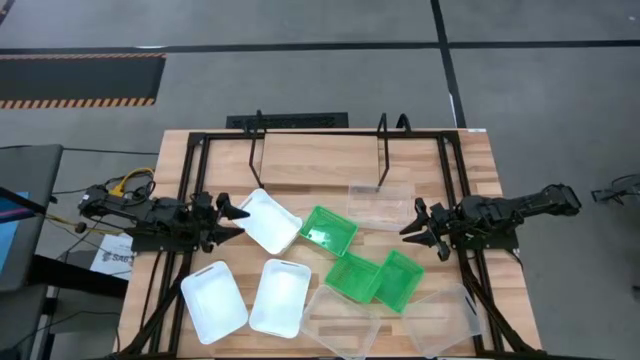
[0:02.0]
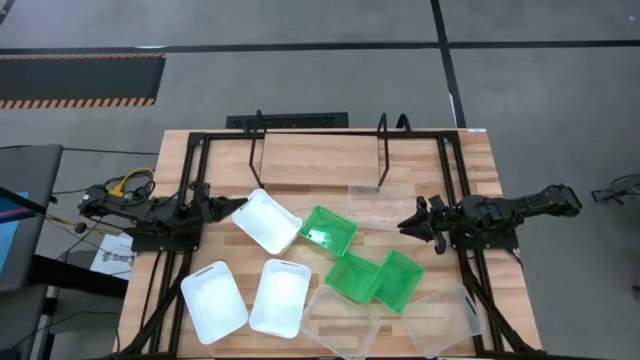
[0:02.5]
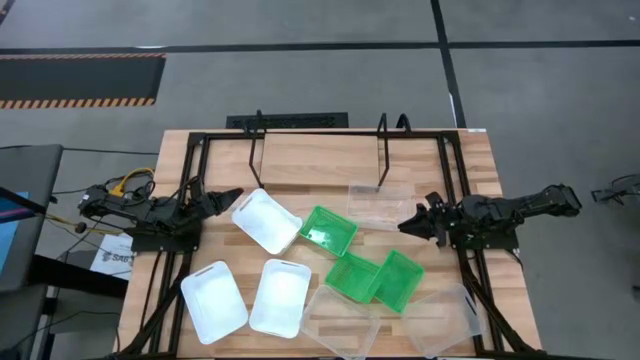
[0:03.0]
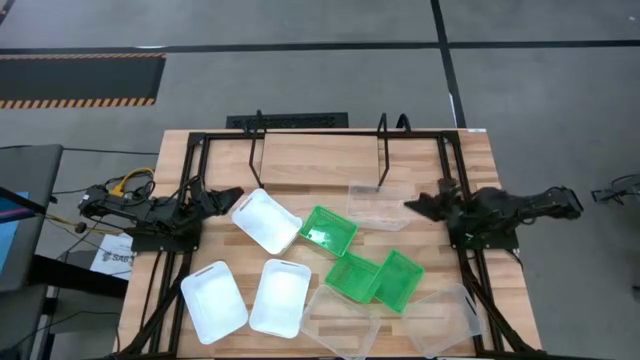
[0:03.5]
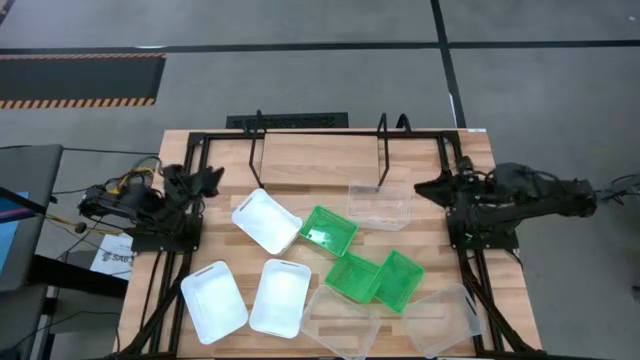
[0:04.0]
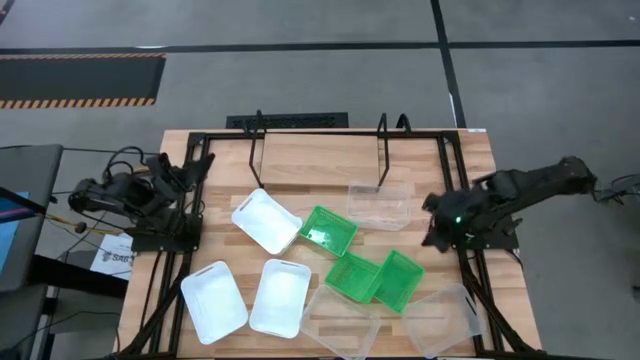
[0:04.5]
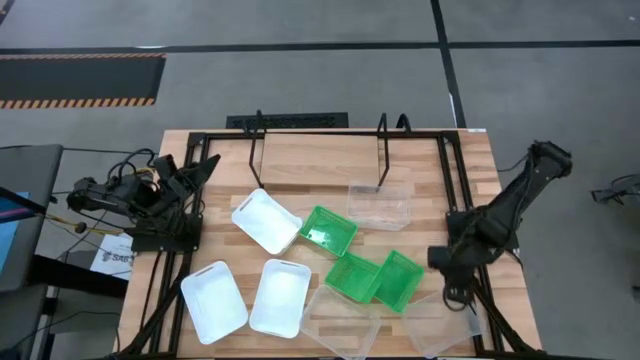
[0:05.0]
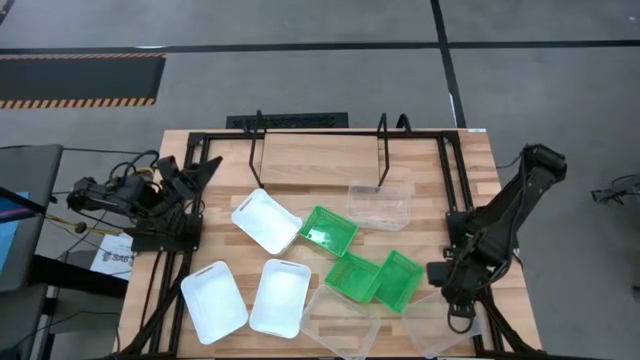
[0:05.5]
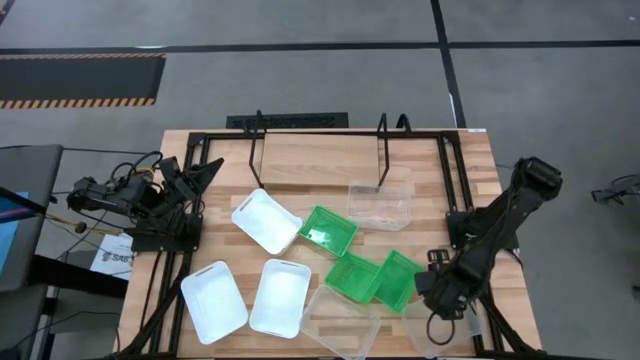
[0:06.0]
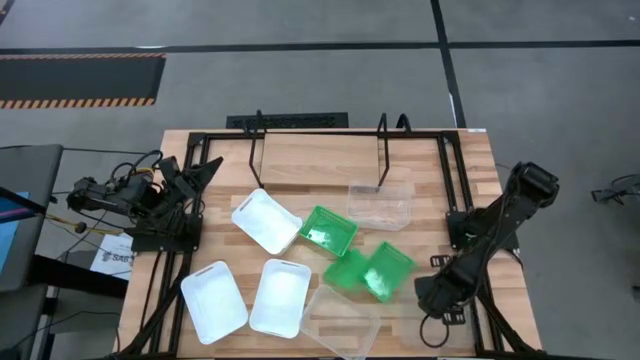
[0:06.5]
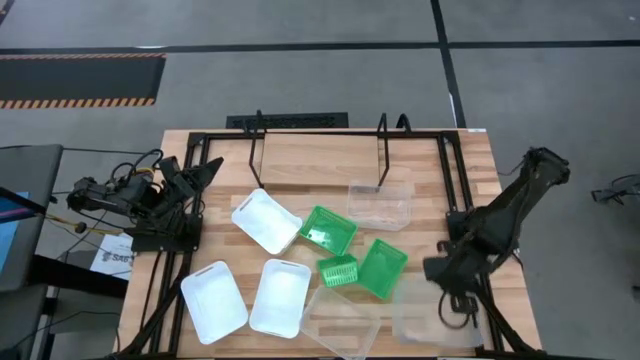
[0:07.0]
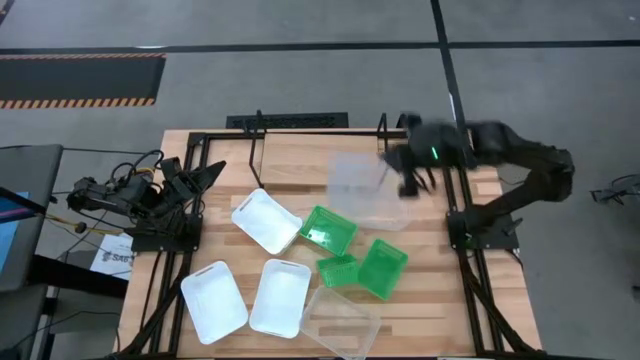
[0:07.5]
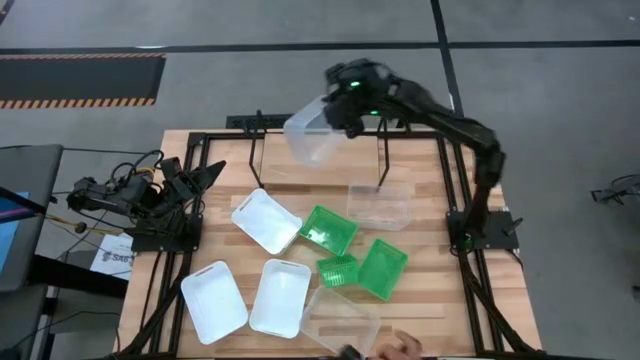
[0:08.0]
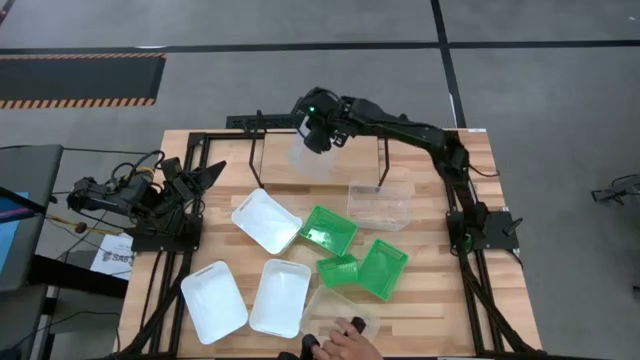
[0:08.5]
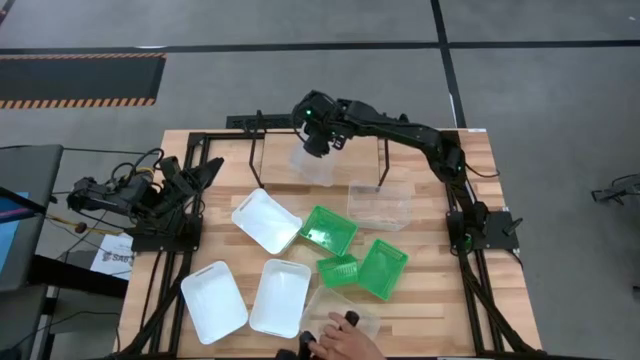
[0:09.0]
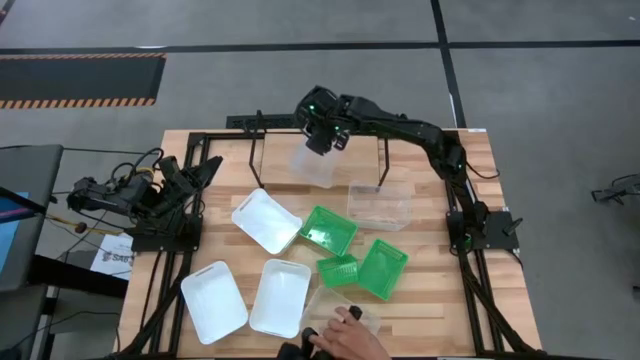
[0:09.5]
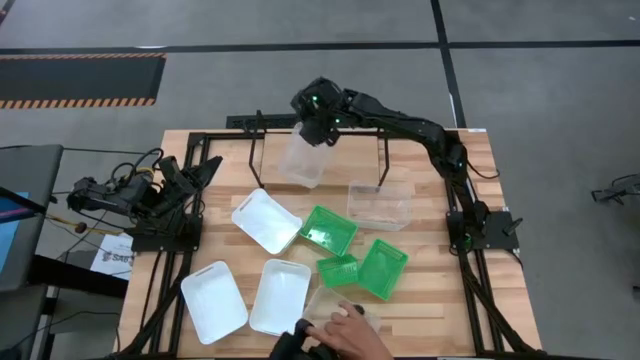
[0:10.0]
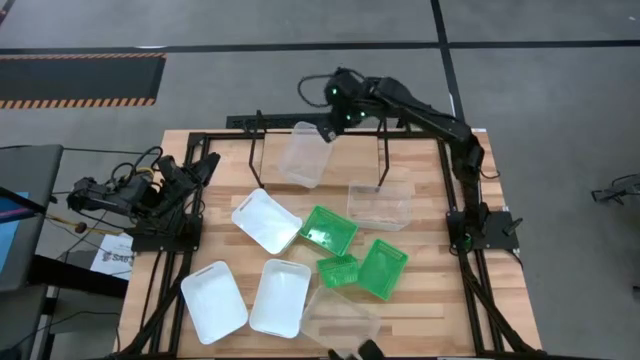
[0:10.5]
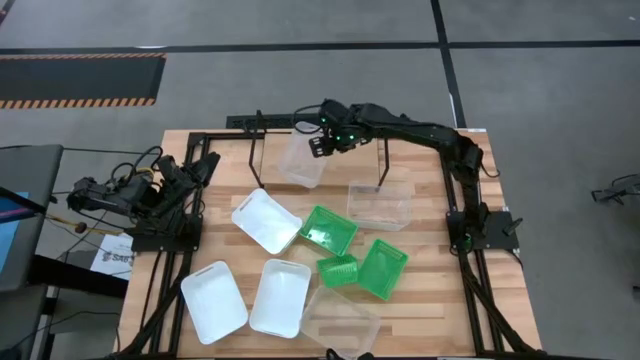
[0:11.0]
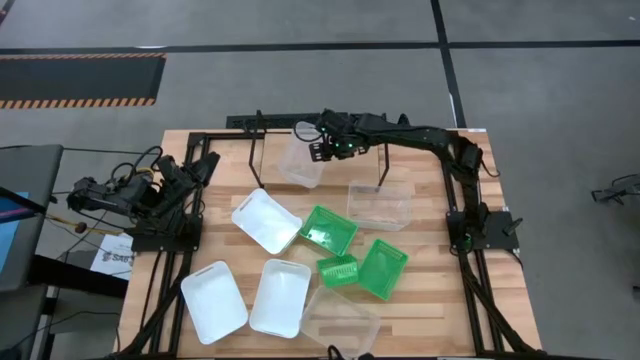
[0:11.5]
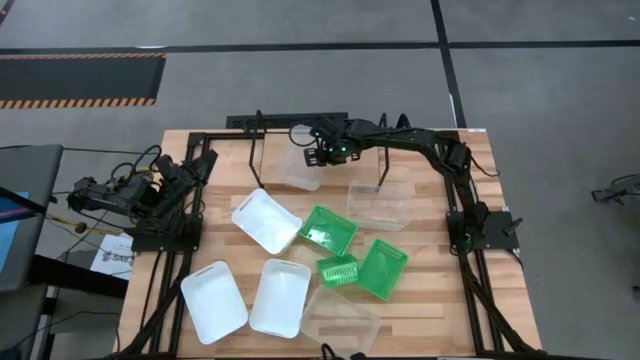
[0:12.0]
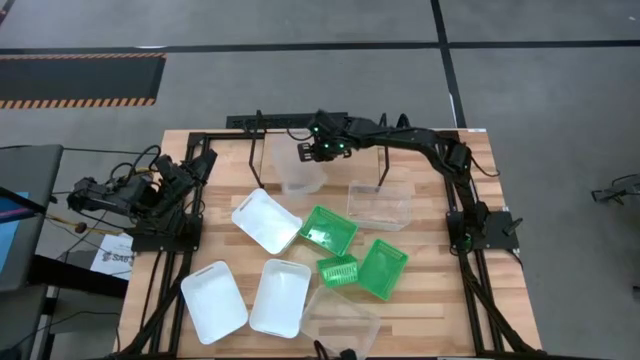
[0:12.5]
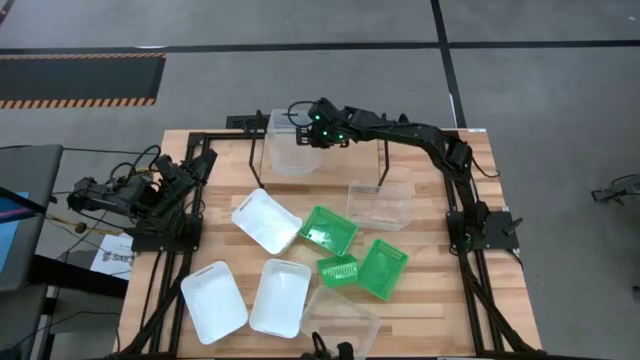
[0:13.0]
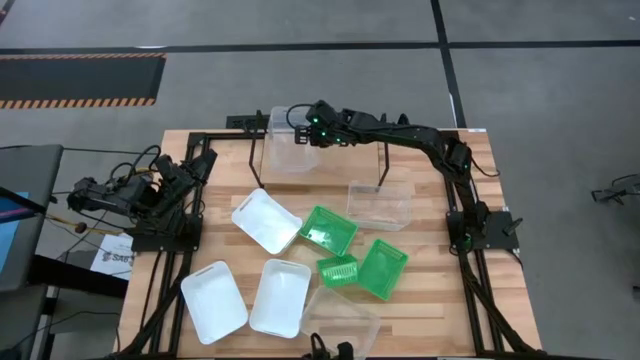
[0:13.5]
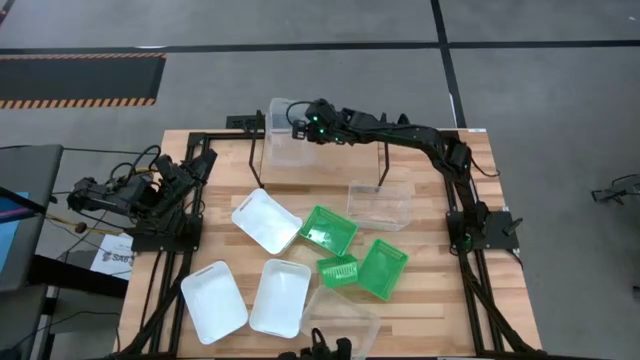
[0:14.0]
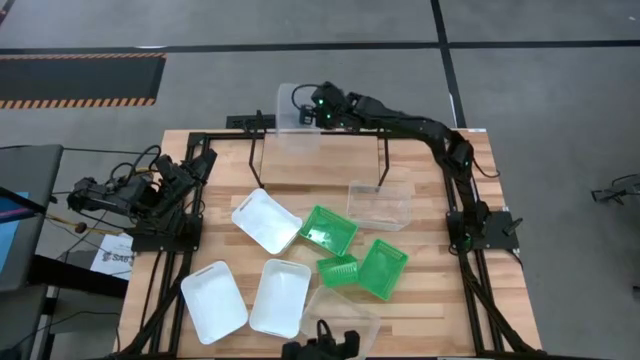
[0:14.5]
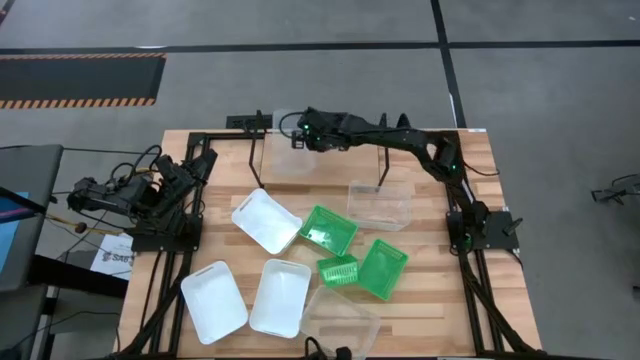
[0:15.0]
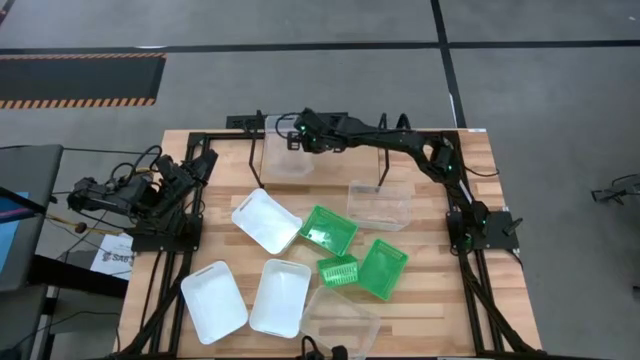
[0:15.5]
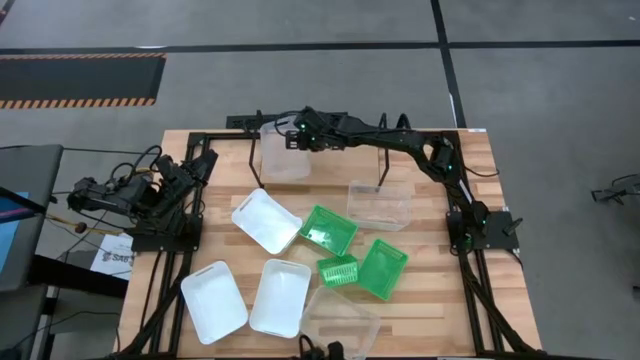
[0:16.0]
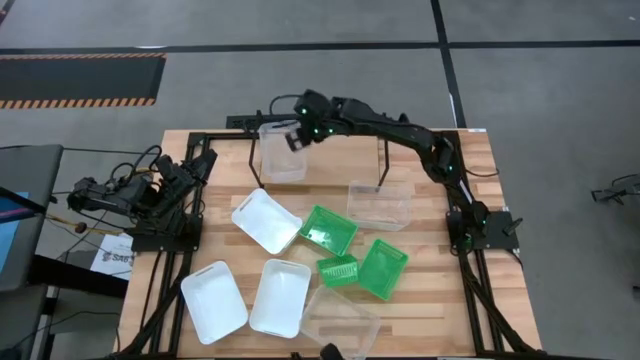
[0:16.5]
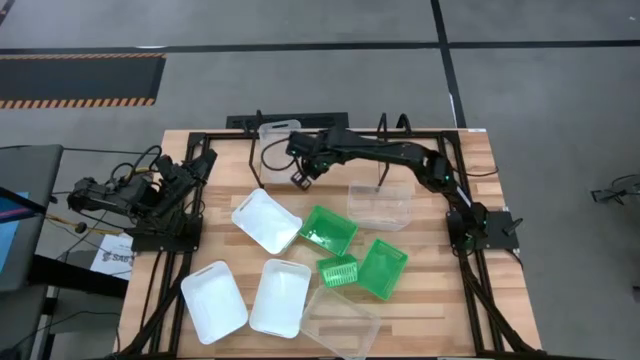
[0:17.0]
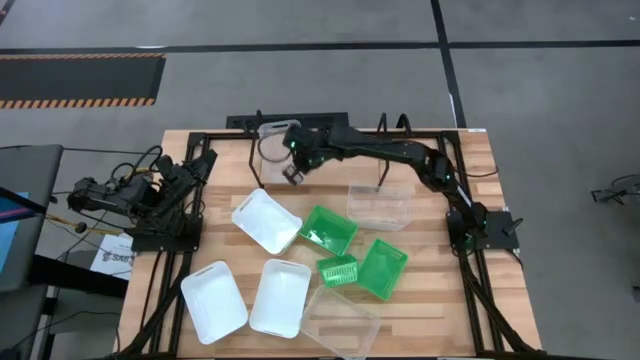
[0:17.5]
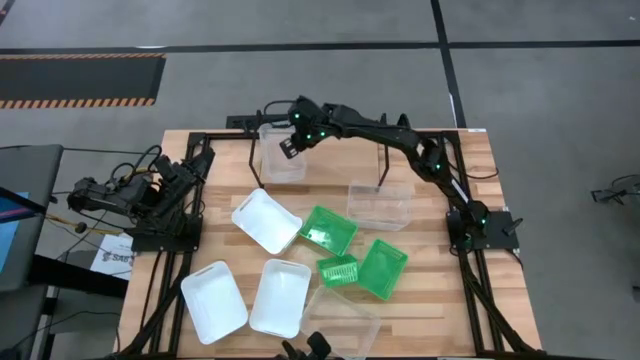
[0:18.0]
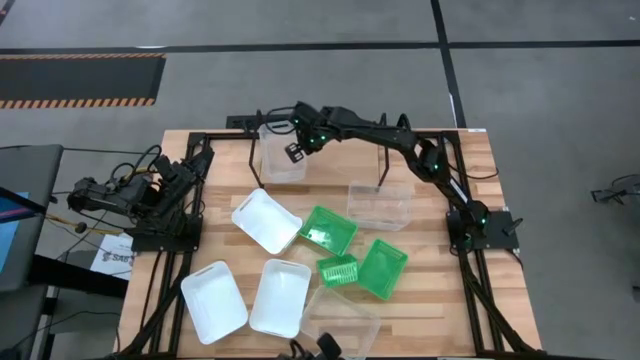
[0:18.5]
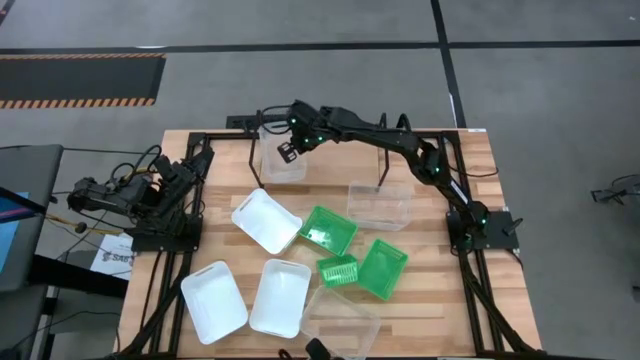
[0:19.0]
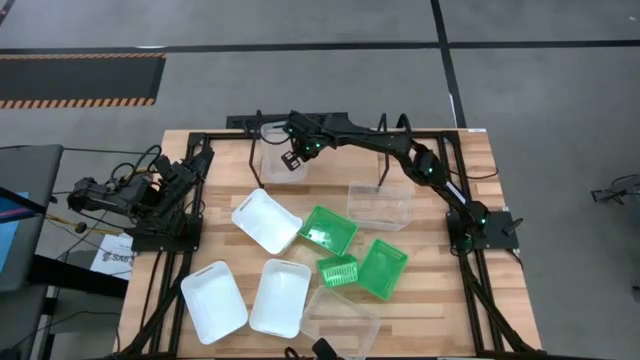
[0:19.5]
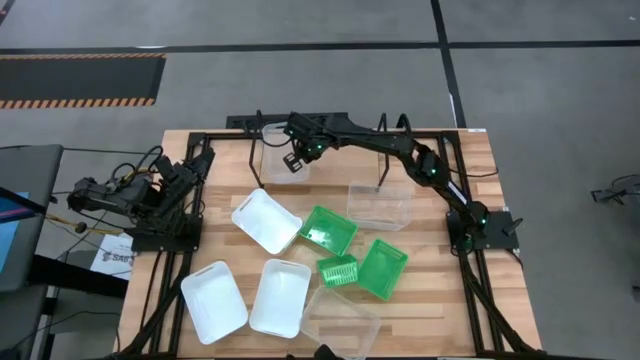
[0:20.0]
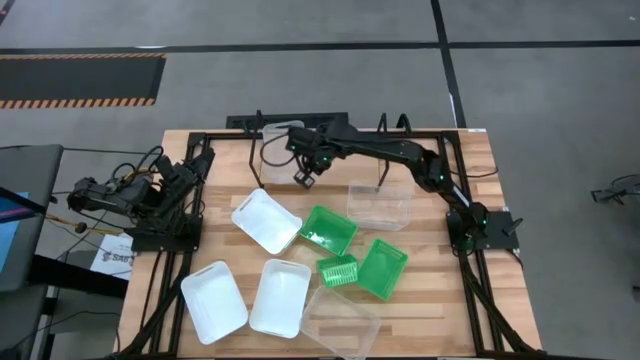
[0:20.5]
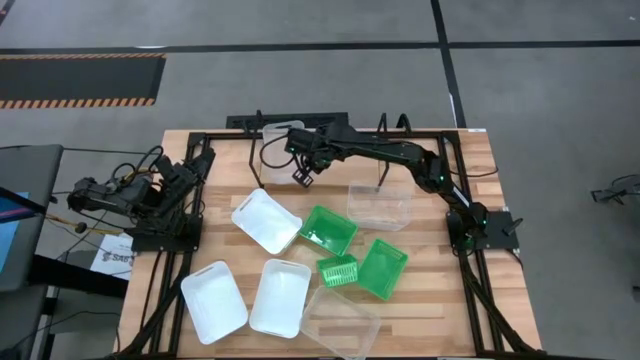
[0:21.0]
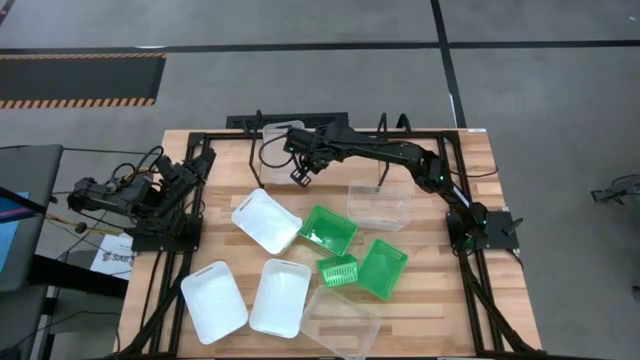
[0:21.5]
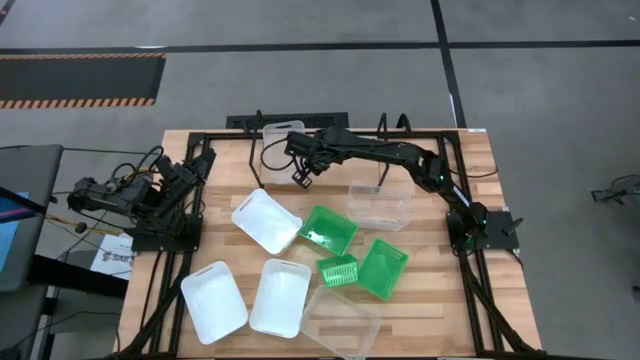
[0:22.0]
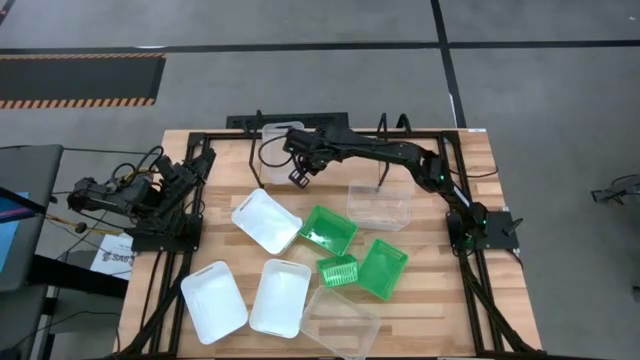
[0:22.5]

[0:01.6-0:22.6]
Task: Stack baskets on shelf by color
Put the bottom right transparent bin on the shelf
